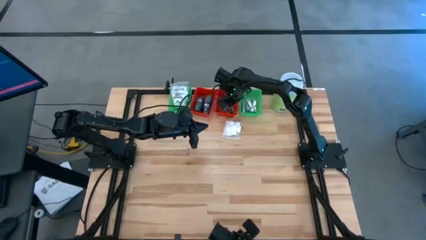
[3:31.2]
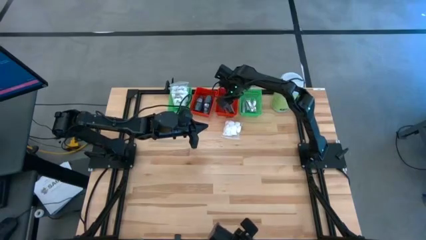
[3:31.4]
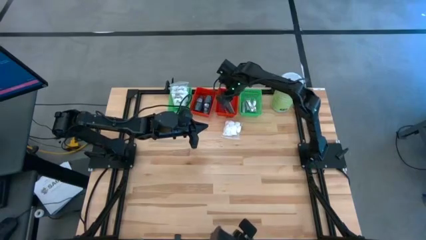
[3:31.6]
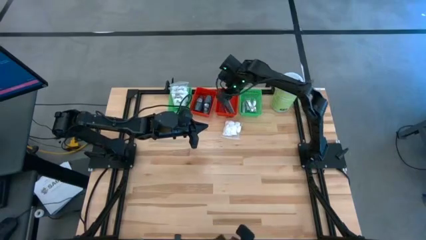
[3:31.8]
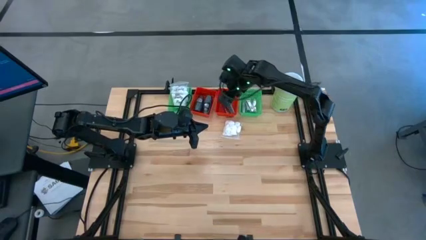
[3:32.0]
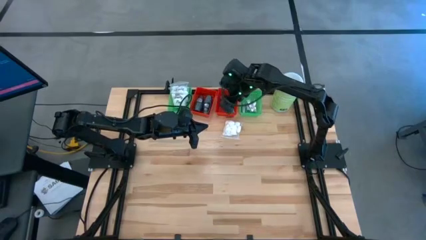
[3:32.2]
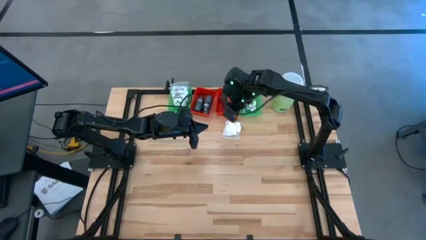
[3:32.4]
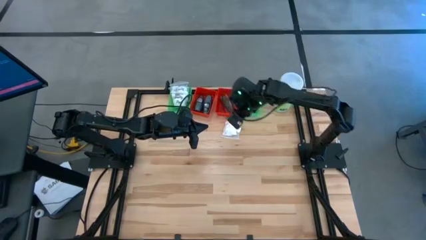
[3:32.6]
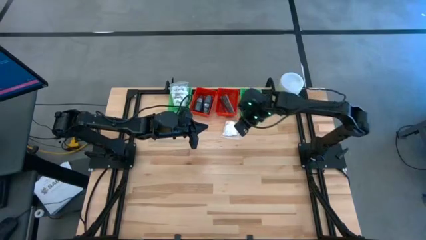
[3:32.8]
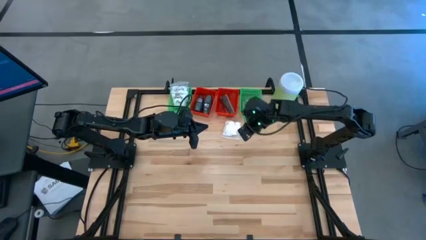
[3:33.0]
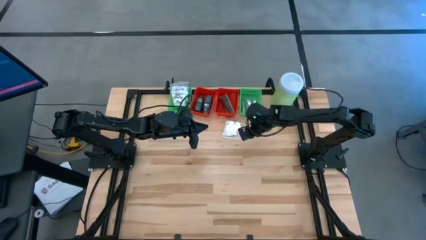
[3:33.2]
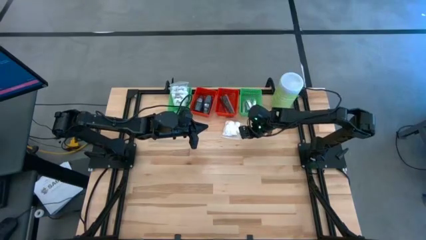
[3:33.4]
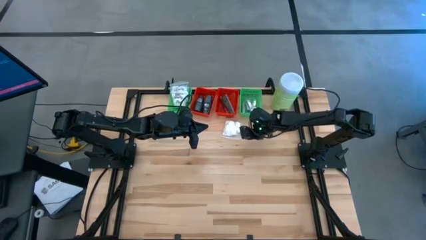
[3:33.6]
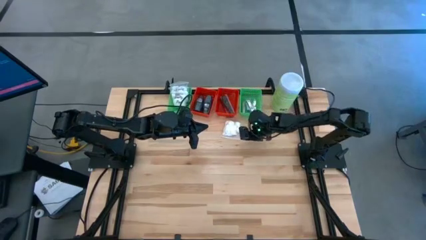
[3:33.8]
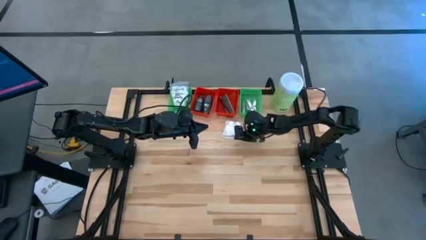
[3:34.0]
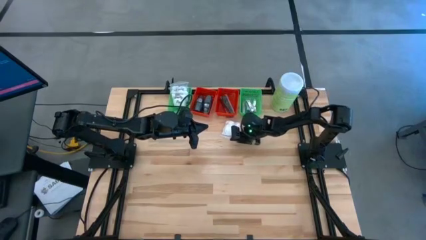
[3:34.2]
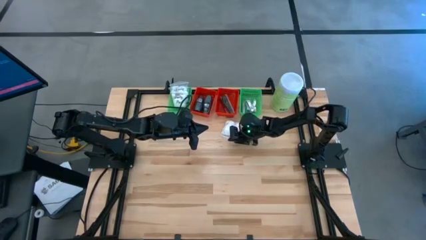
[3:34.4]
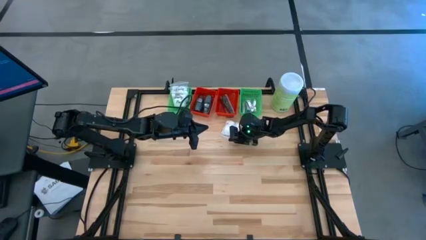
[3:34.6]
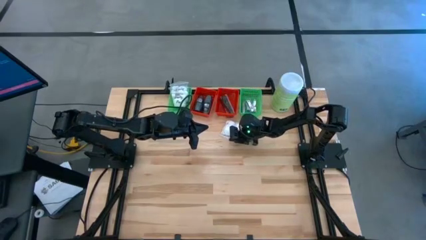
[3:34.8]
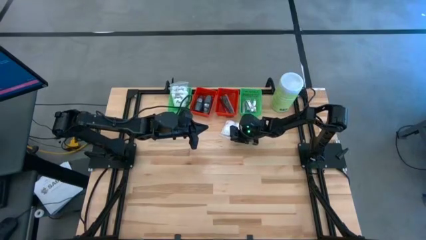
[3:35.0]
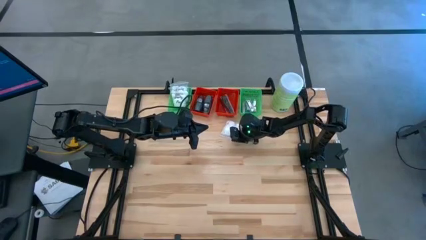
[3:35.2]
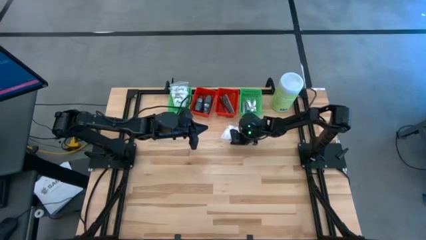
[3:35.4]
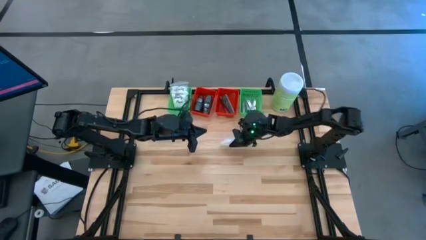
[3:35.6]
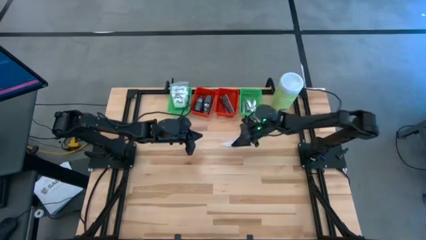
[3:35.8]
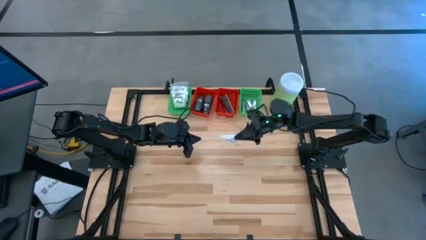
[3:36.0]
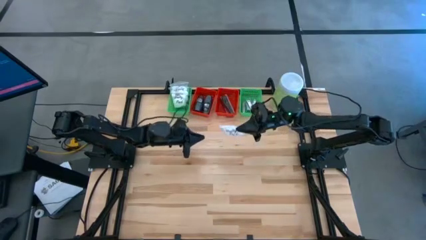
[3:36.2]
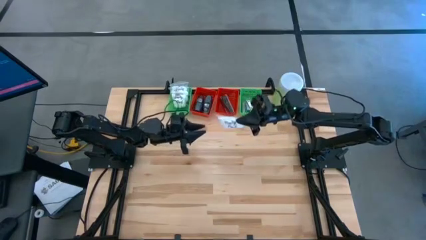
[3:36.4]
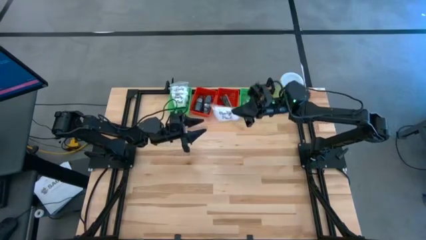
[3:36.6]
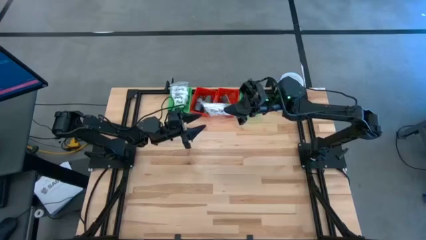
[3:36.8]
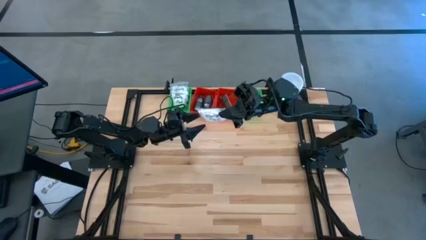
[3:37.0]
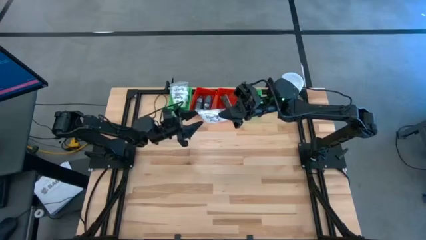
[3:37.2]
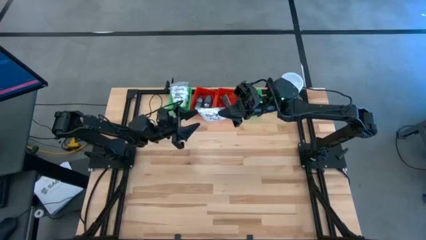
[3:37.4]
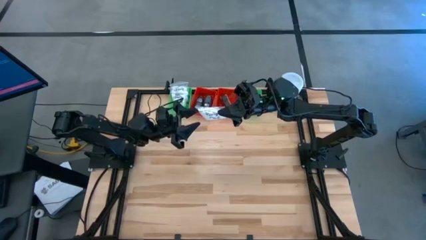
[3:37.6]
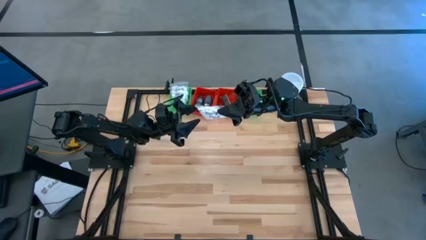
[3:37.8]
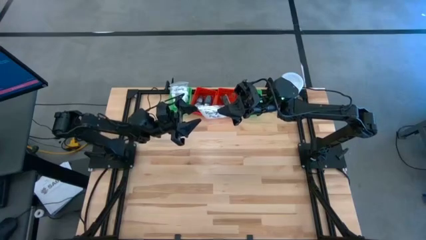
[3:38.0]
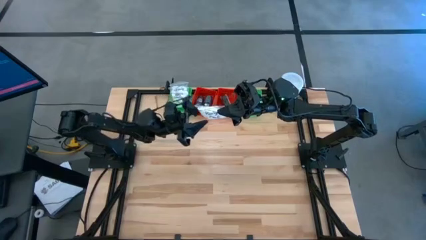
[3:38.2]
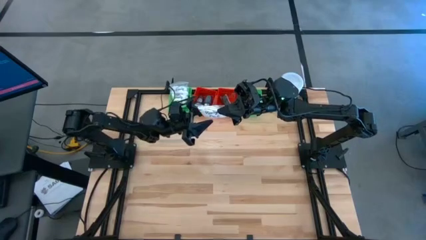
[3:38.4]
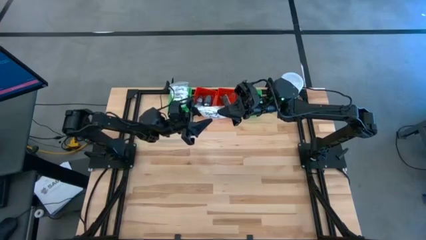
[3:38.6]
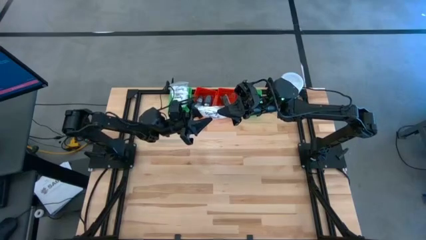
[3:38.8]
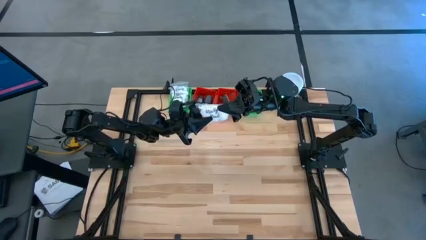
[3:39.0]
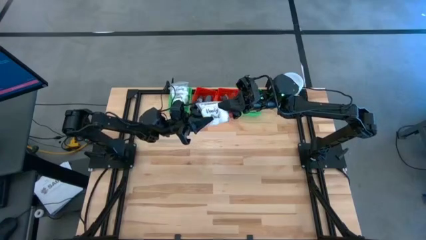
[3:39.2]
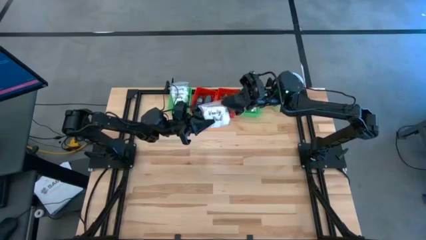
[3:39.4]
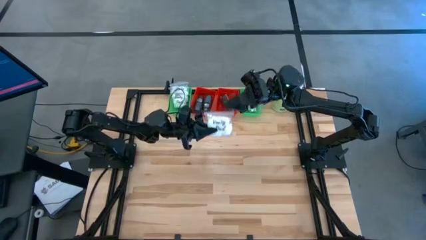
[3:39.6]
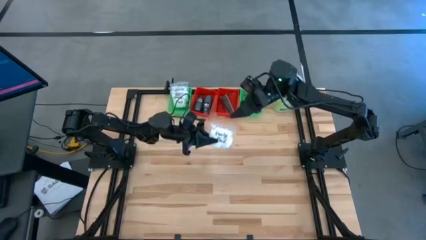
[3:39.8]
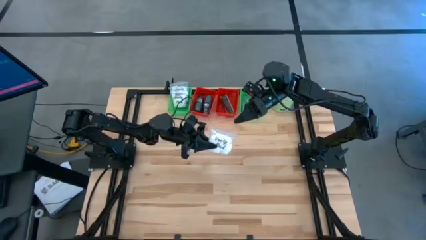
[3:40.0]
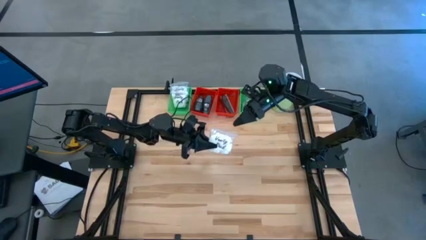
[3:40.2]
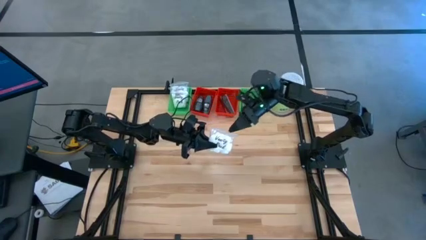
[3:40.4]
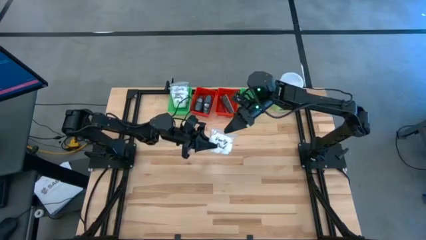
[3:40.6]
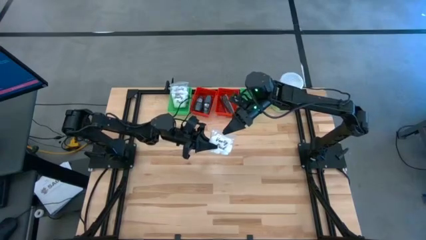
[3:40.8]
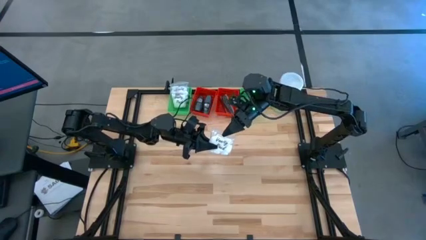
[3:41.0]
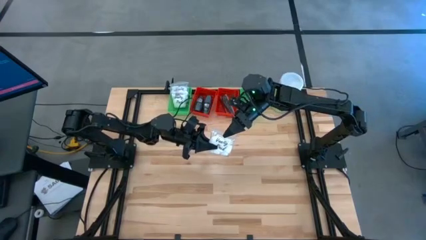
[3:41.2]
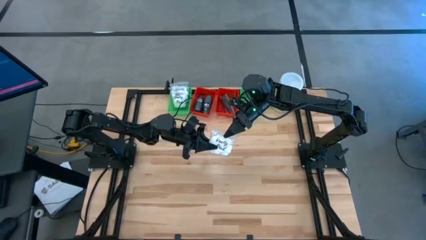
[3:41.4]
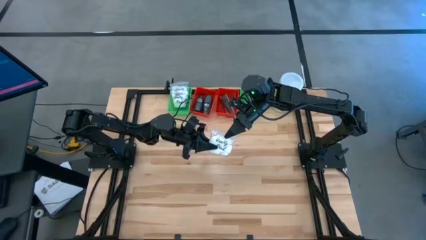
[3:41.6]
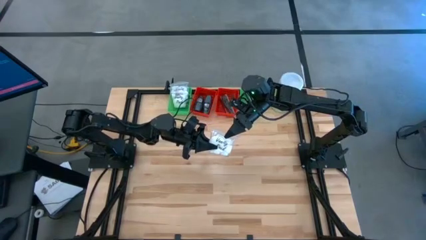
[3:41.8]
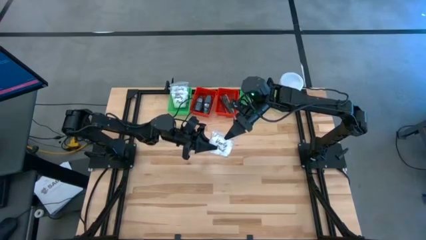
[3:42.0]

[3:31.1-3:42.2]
Task: Pick & Place Travel size toiletries
Put the cotton pack into the left green basket

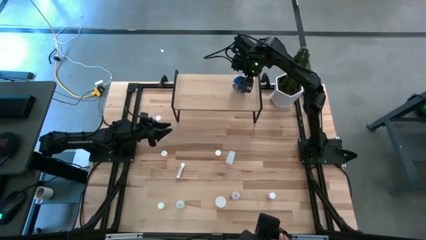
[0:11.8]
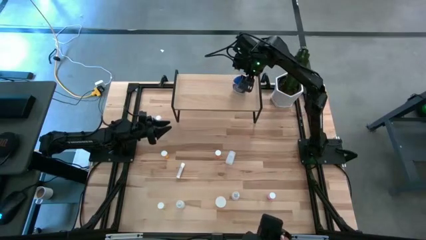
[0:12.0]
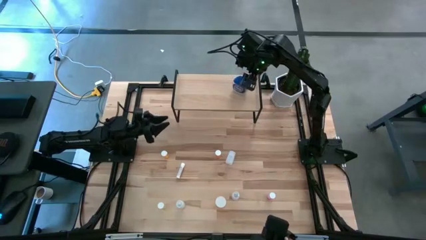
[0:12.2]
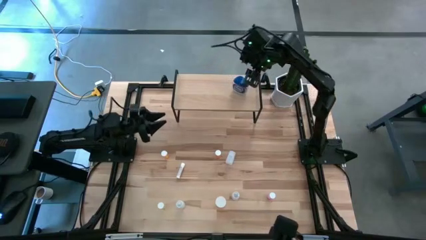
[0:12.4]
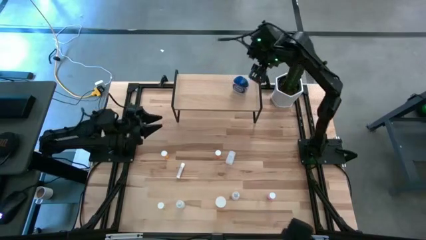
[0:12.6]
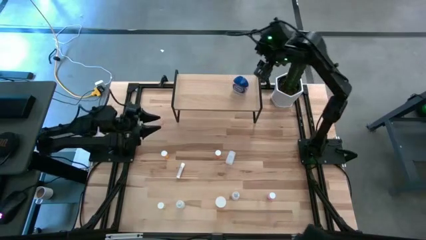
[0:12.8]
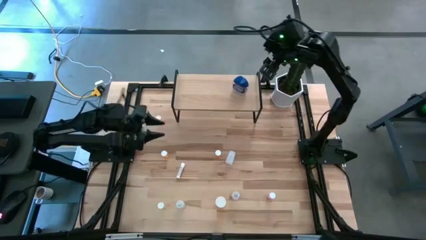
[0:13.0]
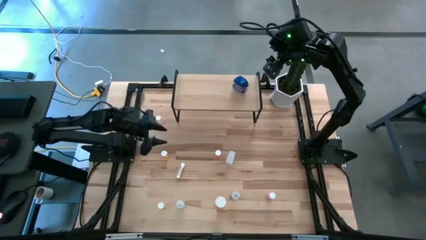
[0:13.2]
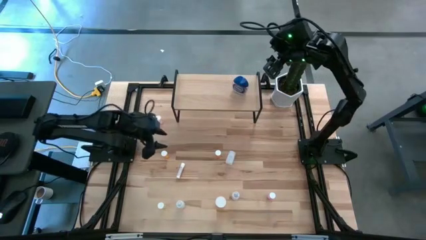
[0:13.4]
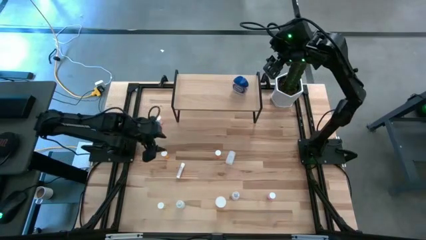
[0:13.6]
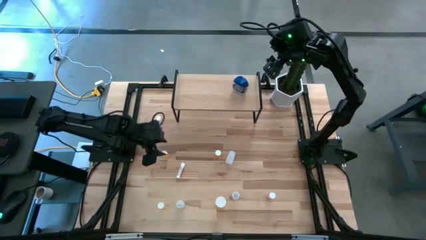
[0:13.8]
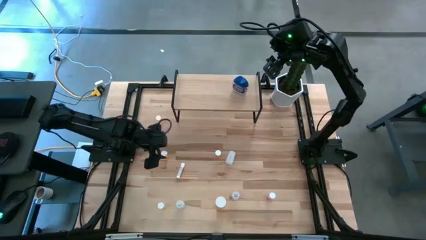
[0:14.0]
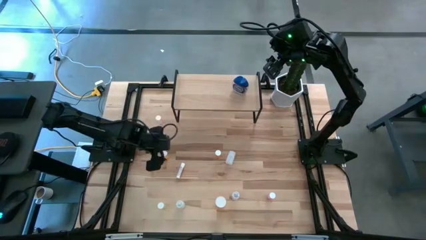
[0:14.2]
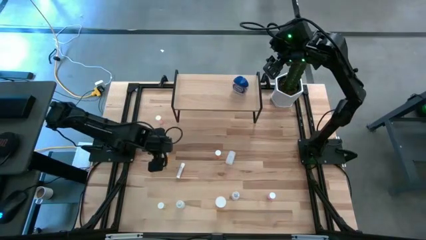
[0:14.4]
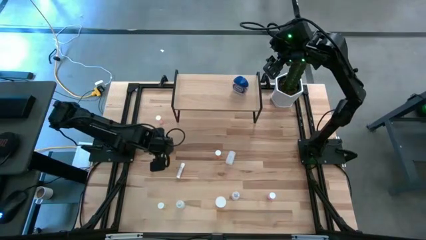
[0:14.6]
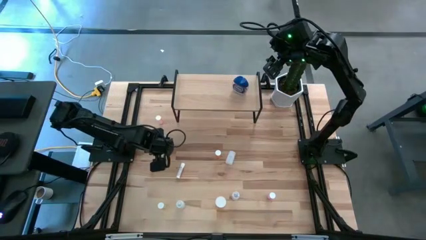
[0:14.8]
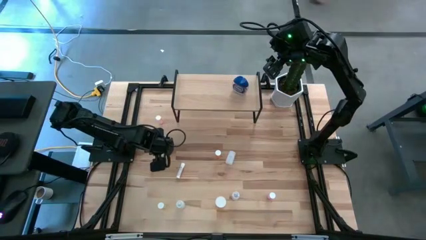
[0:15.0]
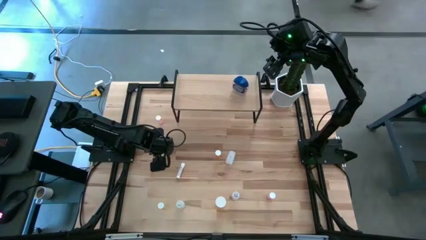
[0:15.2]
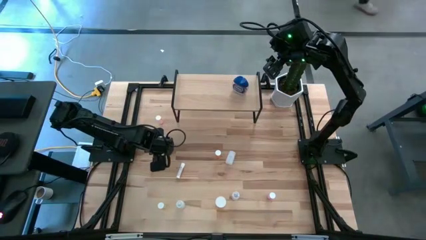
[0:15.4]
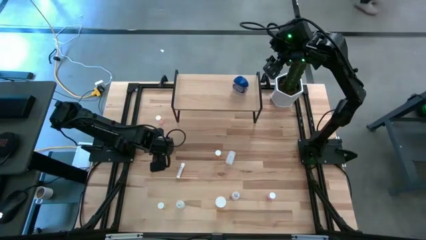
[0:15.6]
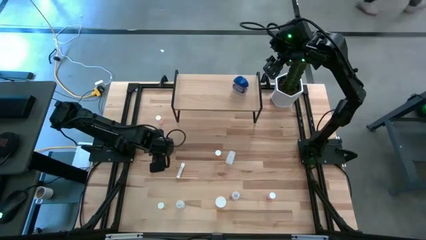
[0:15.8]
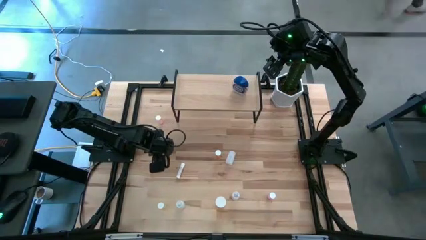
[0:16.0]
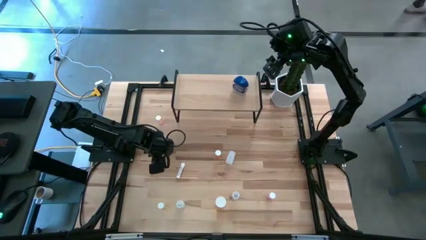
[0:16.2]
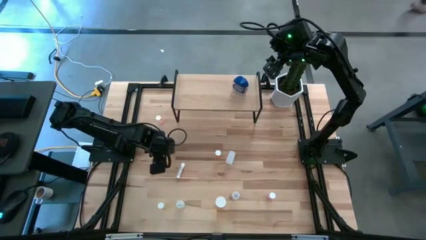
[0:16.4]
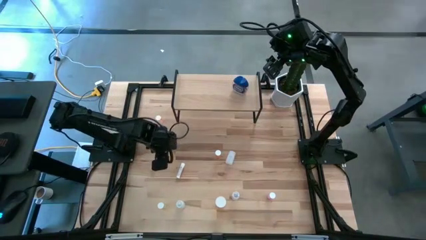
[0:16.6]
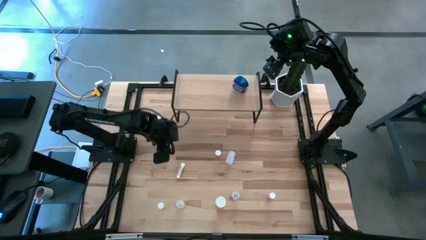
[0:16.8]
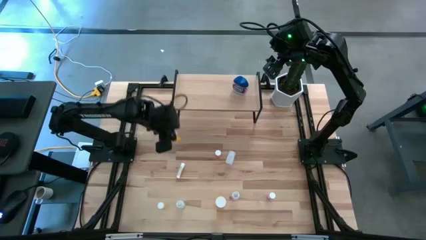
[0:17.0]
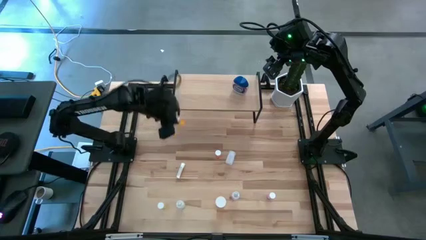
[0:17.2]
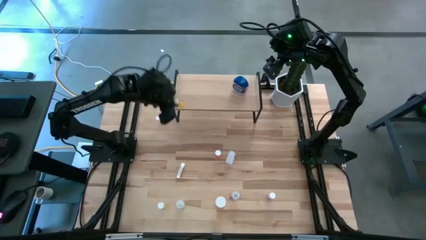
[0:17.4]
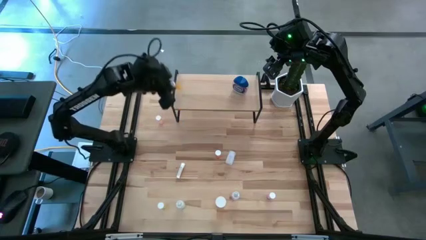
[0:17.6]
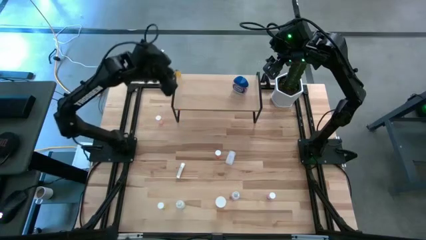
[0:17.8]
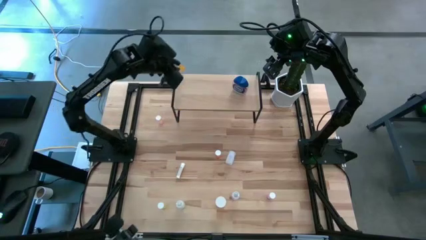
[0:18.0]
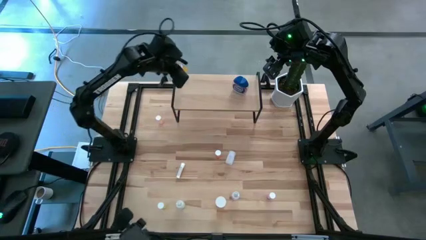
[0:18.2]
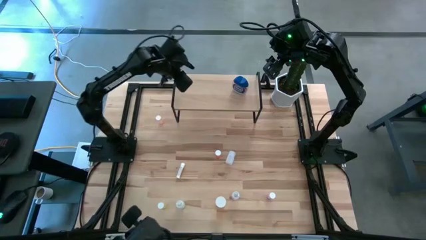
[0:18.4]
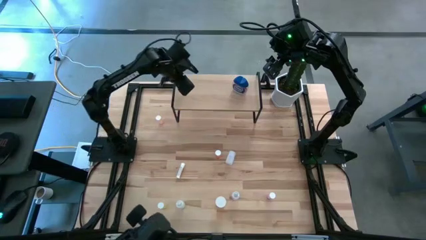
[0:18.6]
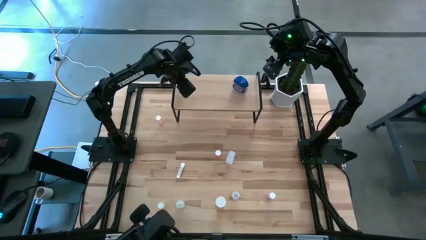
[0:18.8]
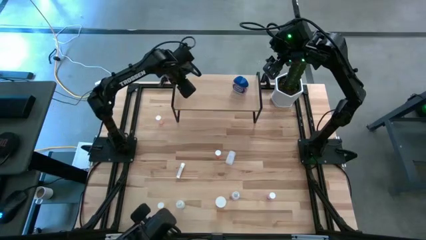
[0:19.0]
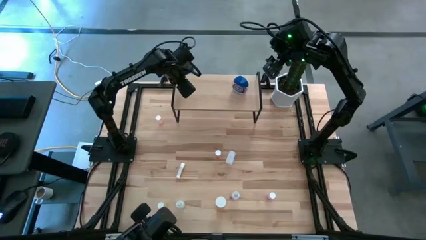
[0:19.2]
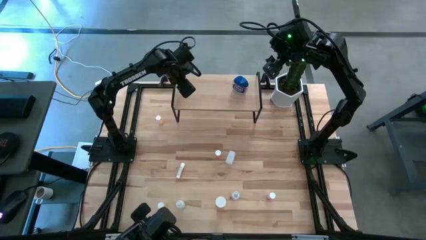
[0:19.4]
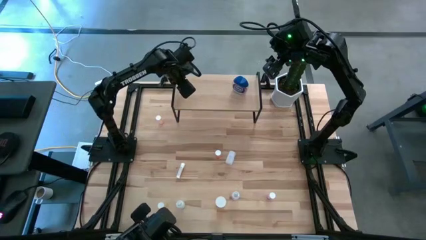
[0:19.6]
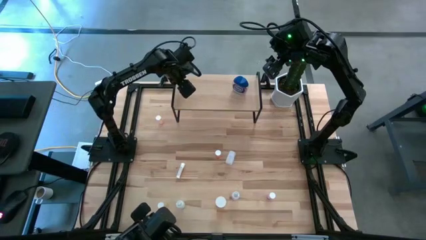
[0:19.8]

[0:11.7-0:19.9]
Task: Pick and place medicine bottles onto shelf by color
Put the small left orange pill bottle on the shelf
